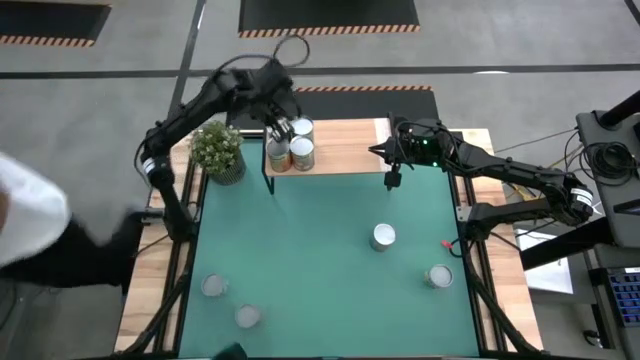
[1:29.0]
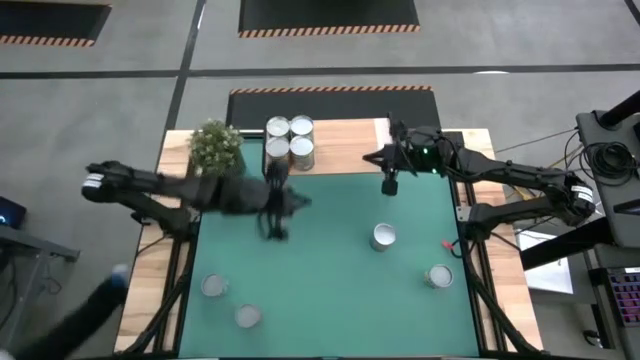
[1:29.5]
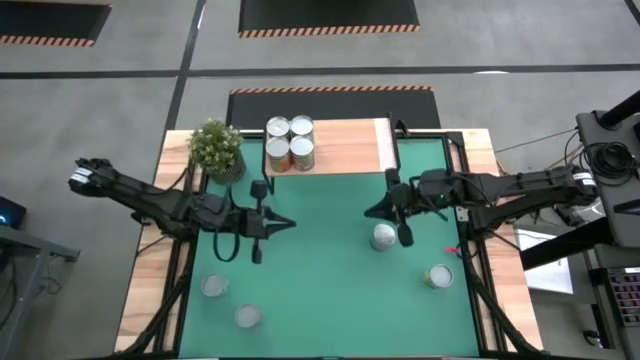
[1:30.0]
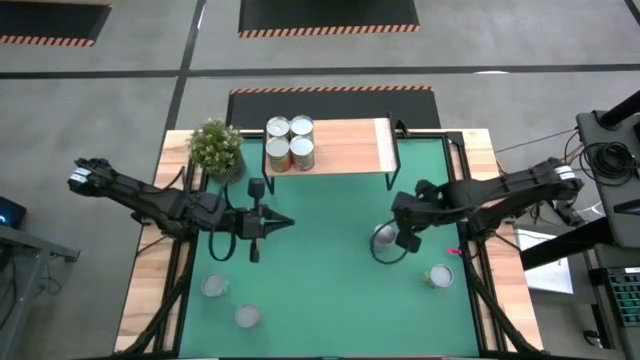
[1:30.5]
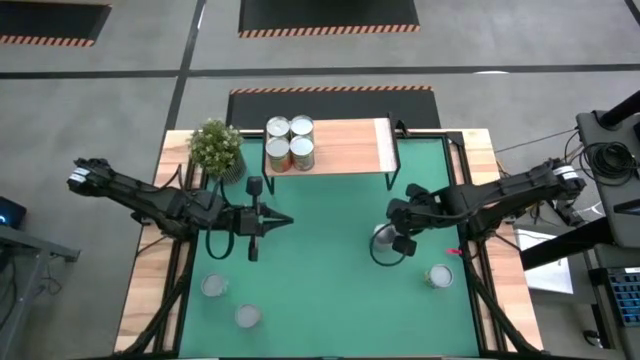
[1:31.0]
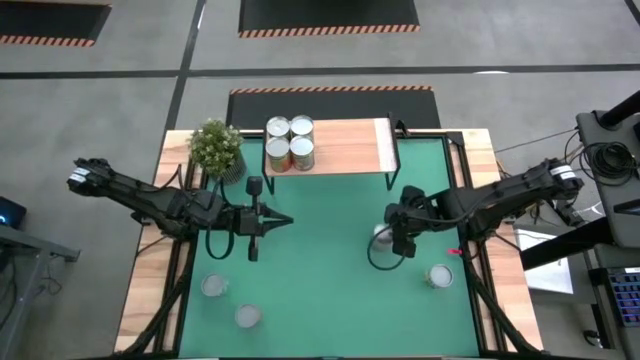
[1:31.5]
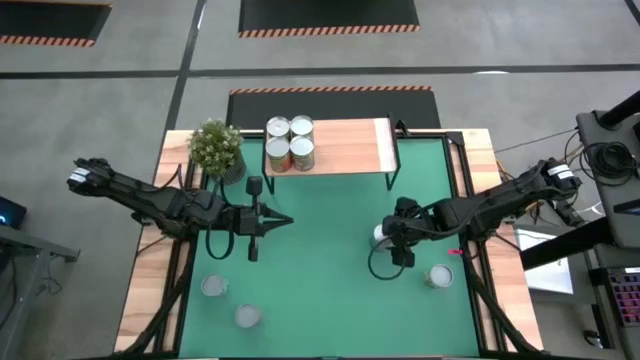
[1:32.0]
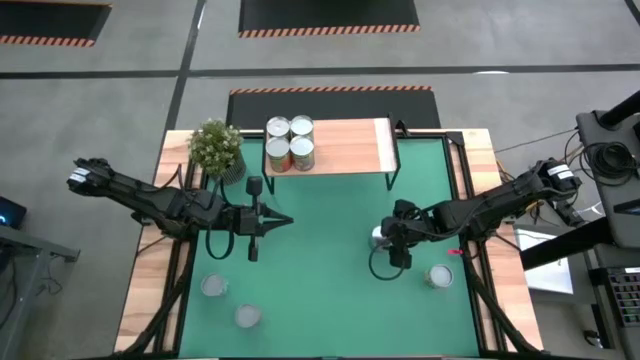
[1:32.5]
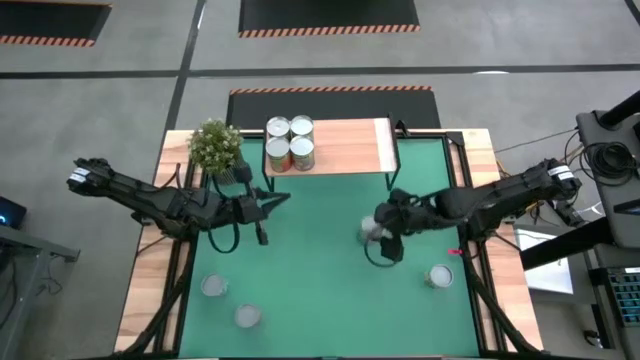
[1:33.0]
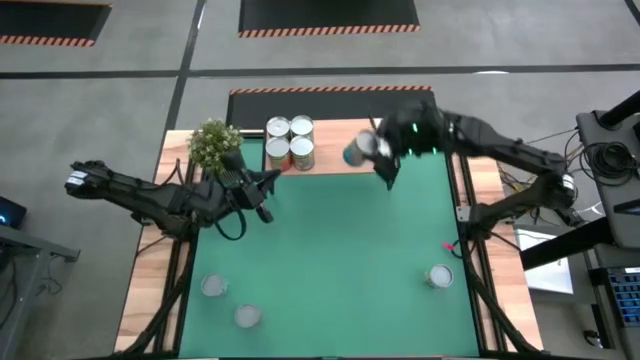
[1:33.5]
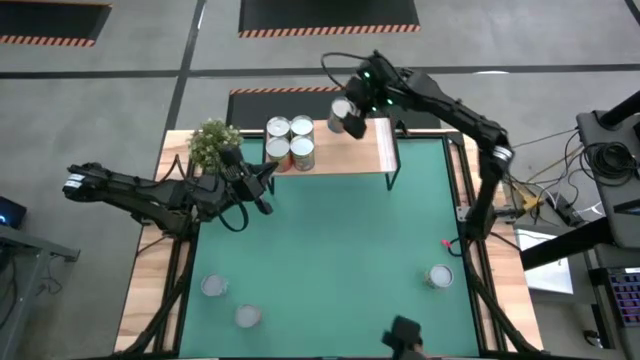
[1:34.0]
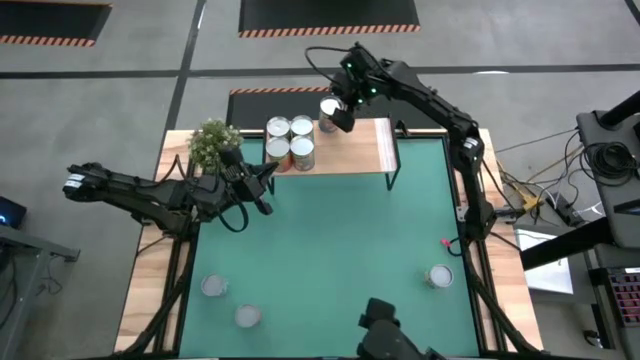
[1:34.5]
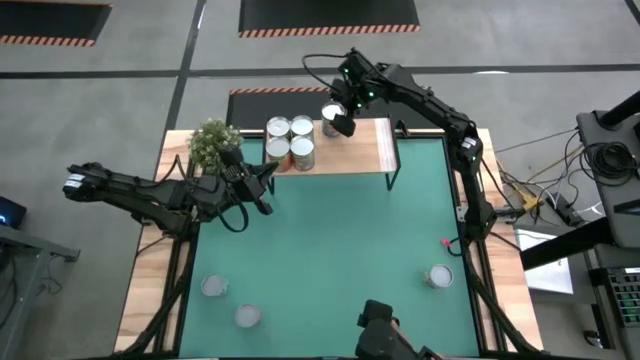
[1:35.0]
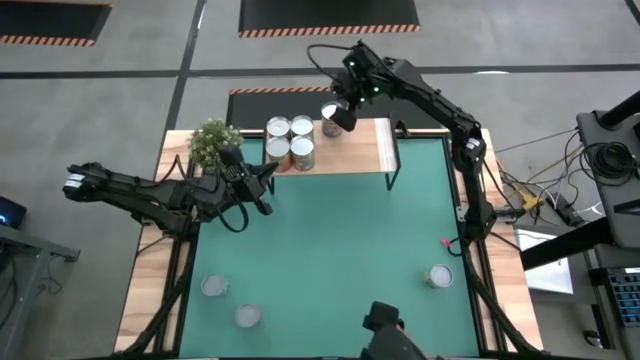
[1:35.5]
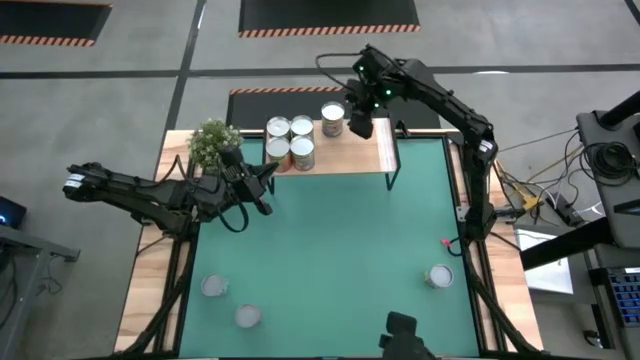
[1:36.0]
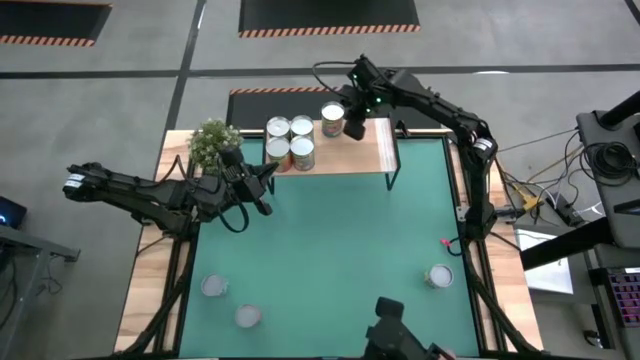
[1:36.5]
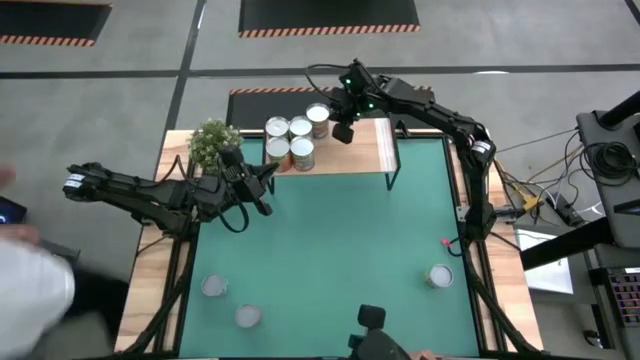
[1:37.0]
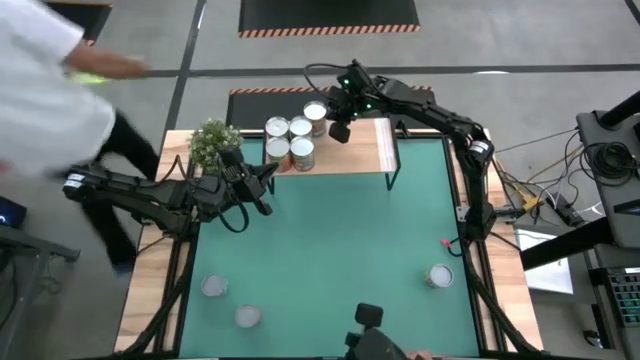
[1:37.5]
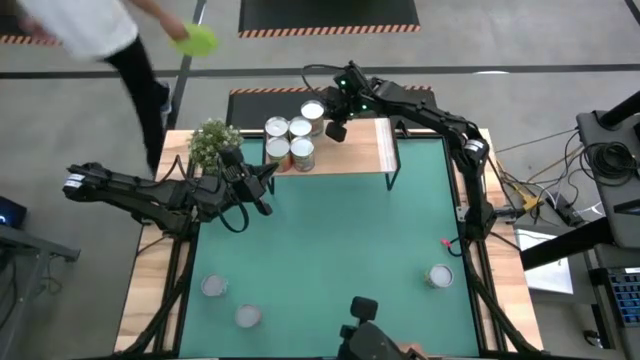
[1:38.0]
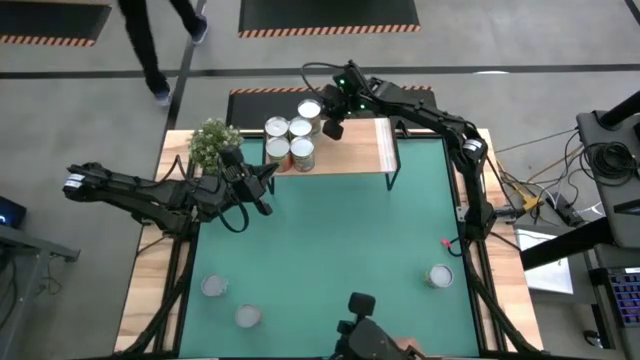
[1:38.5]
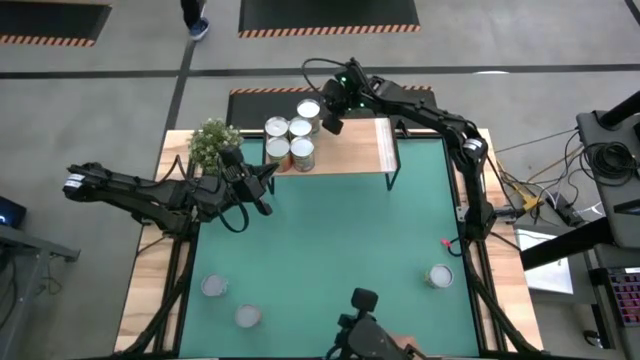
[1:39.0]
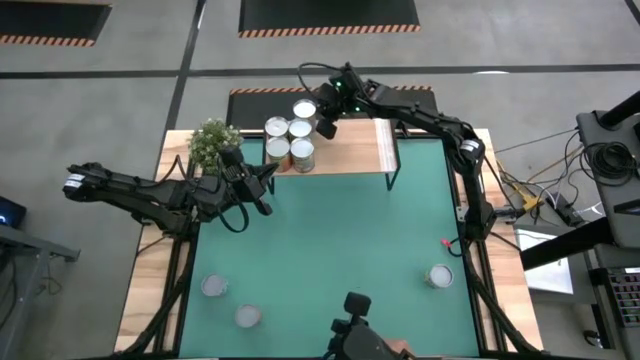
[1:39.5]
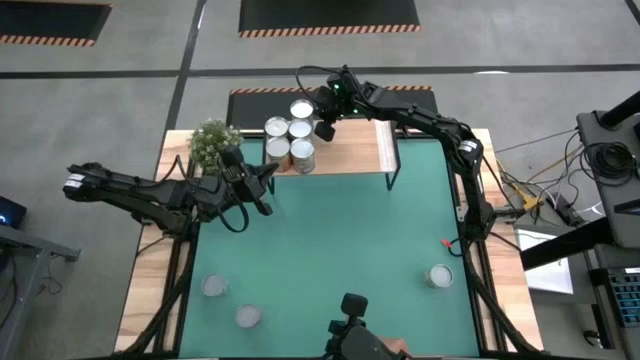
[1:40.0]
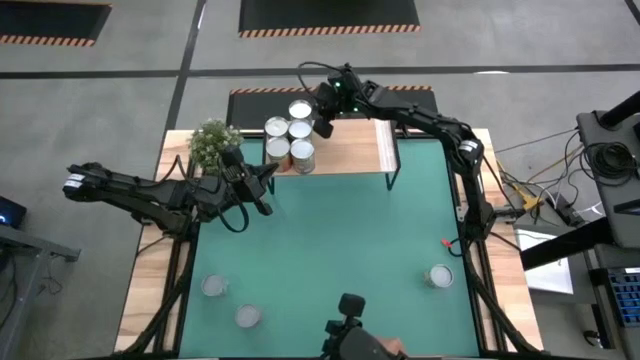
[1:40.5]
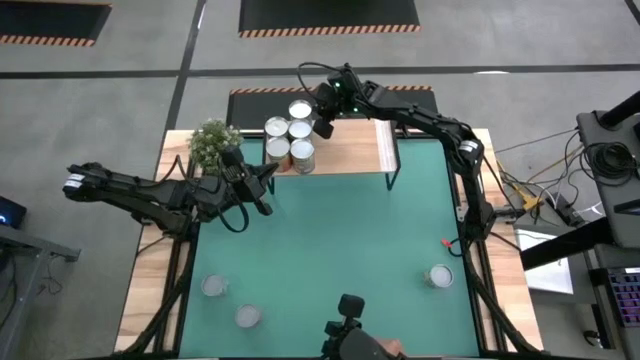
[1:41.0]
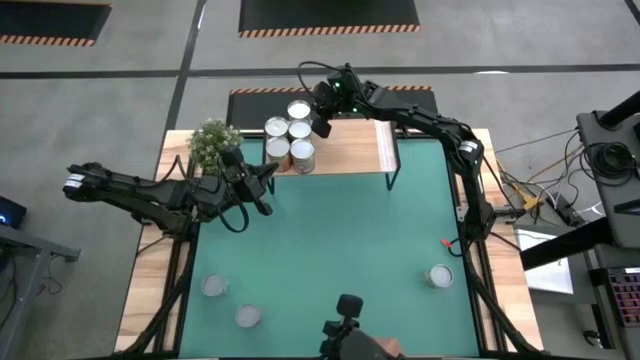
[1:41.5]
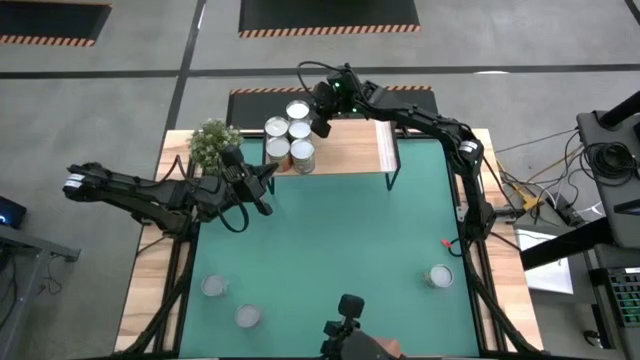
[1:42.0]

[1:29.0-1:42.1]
Task: Pick and place cans onto a shelf
Put the big canned tomatoes on the shelf aligned with the other big canned cherries

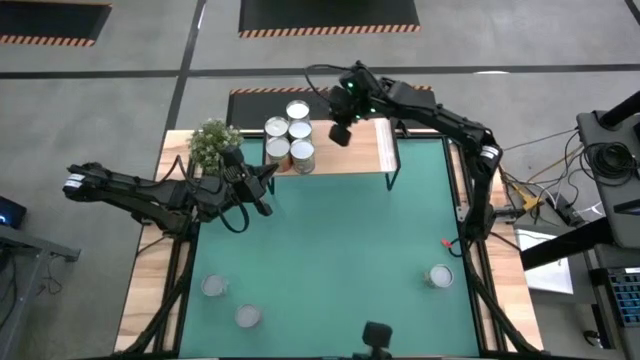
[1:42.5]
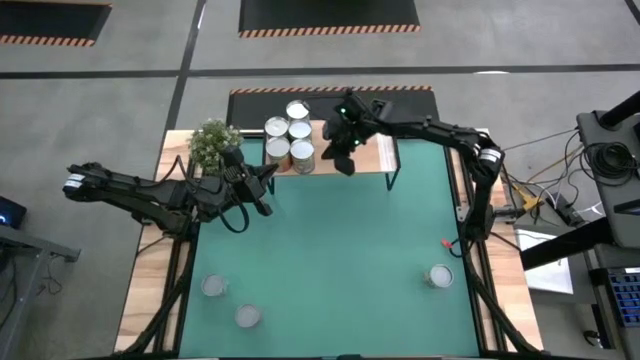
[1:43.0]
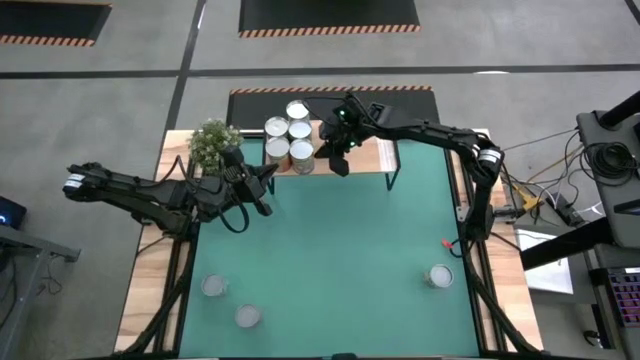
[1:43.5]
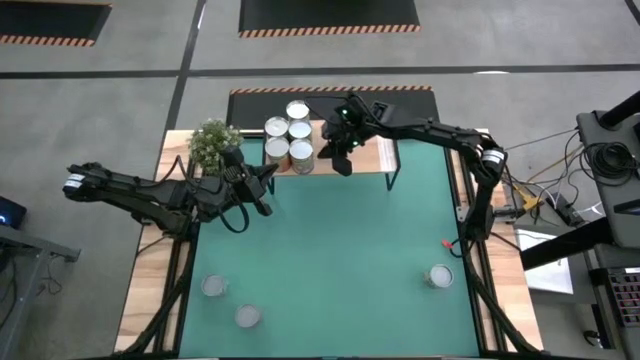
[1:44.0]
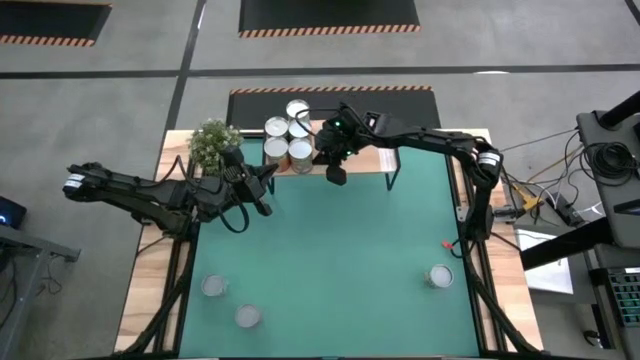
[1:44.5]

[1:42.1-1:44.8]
Adjust the big canned peaches on the shelf

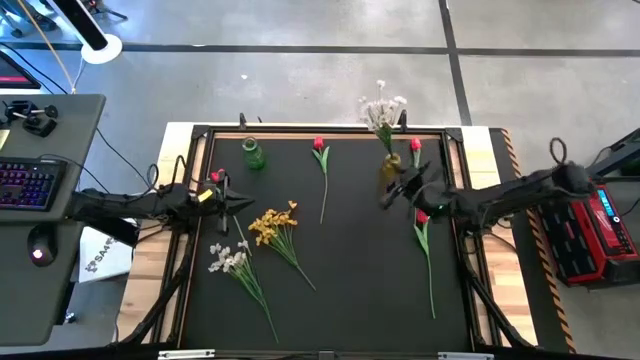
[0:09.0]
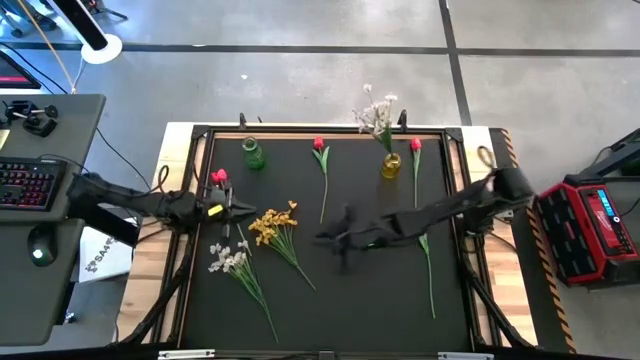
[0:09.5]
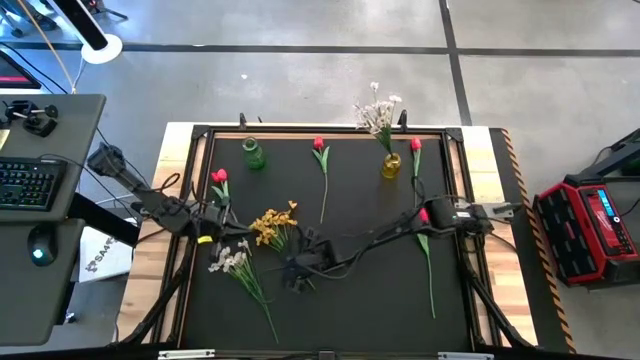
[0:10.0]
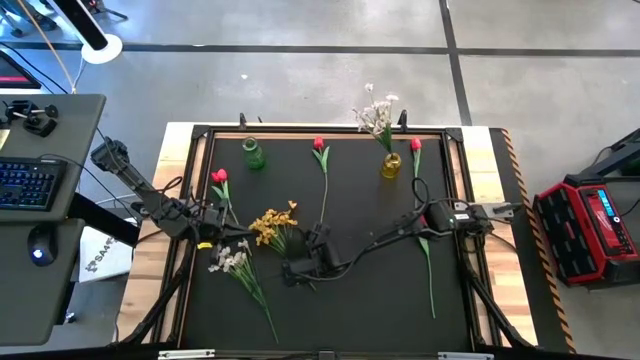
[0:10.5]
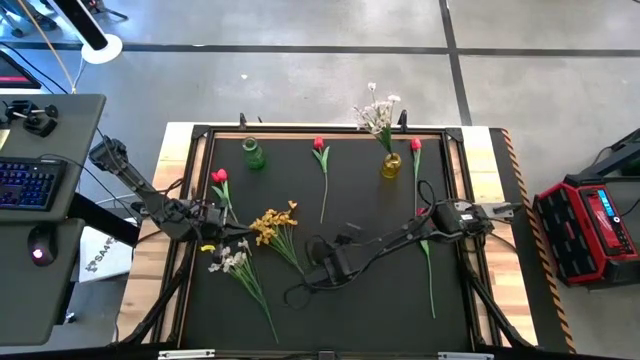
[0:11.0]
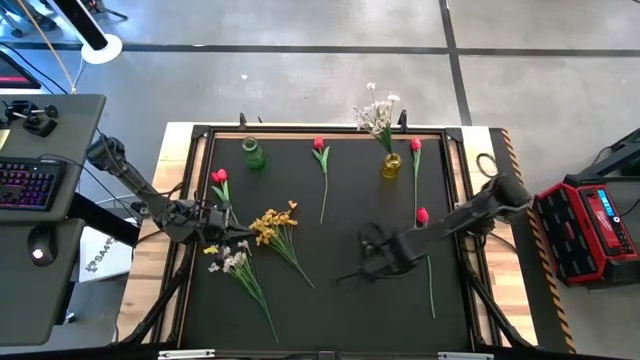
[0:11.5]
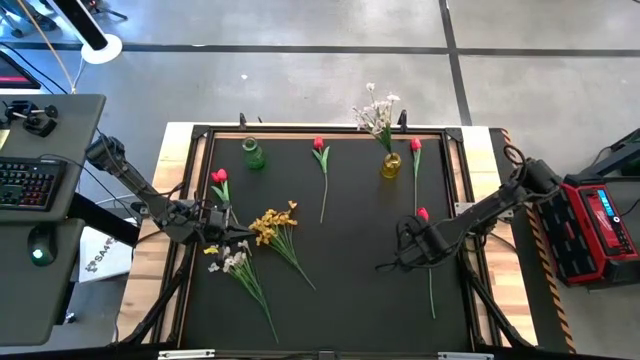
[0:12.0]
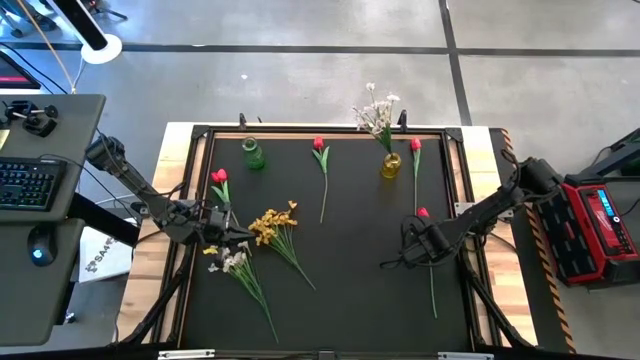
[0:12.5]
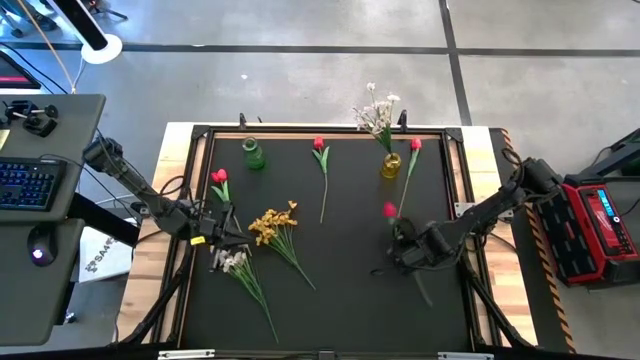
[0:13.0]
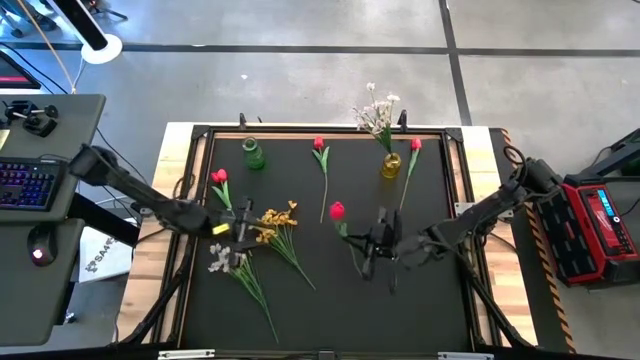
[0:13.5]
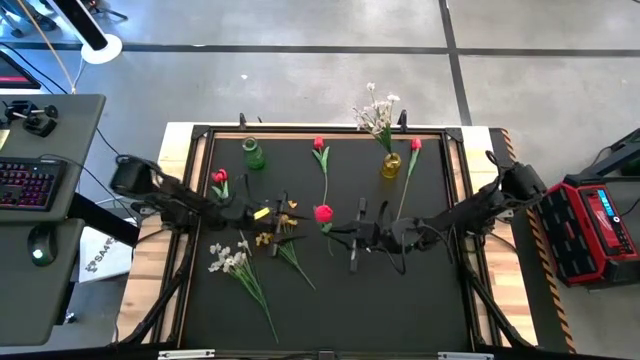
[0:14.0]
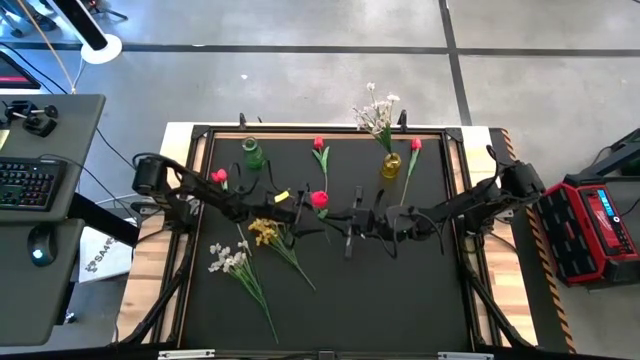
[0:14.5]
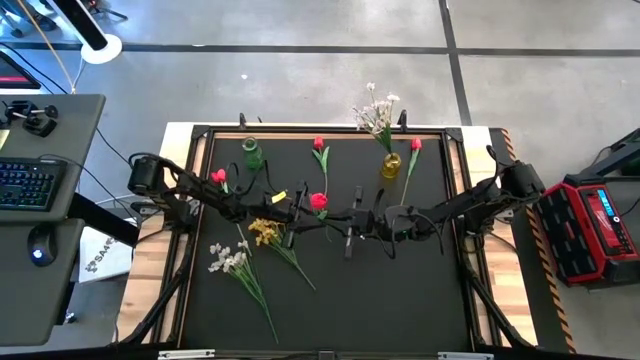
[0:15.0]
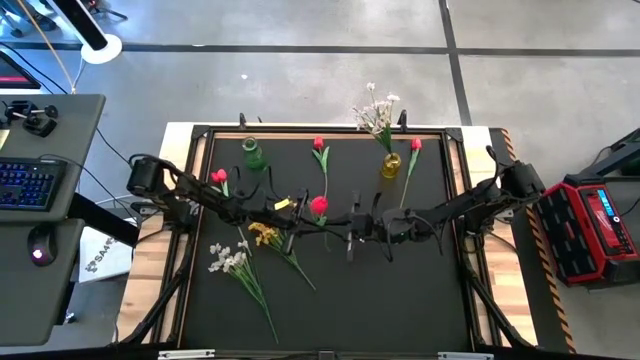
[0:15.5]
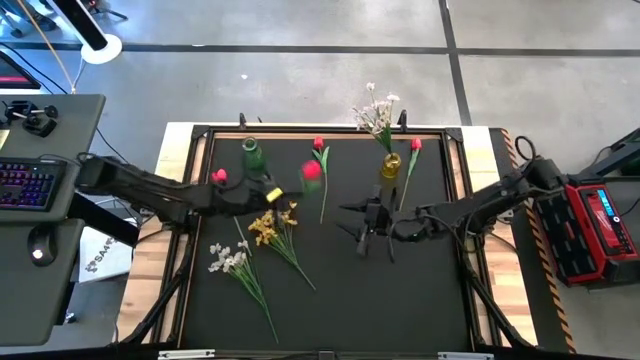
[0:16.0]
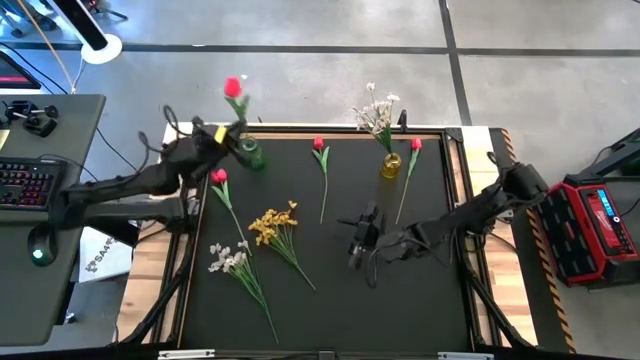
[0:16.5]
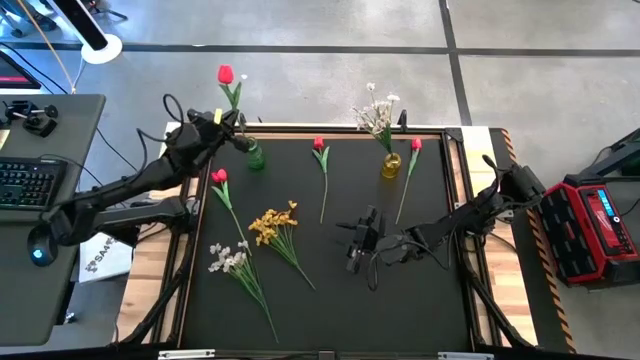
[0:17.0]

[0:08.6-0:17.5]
Task: Sort flowers into vase by color
Put the bottom right red tulip into the green flower vase
